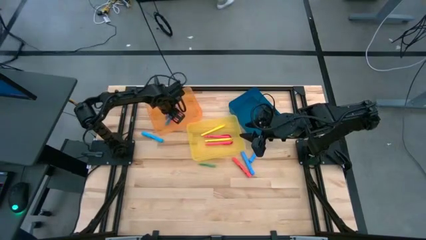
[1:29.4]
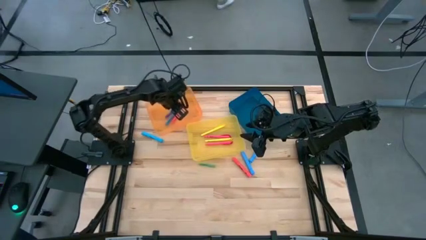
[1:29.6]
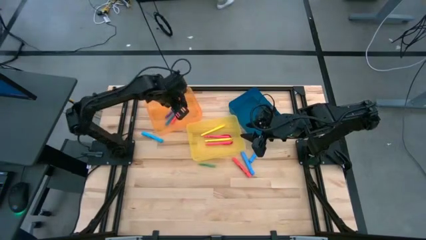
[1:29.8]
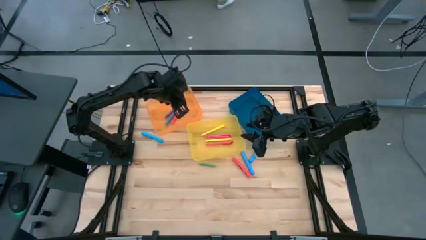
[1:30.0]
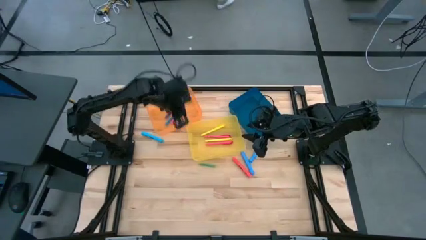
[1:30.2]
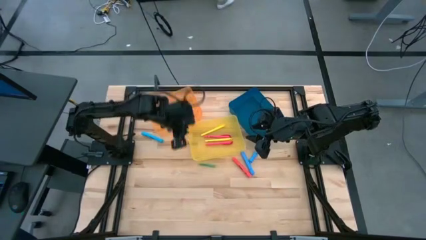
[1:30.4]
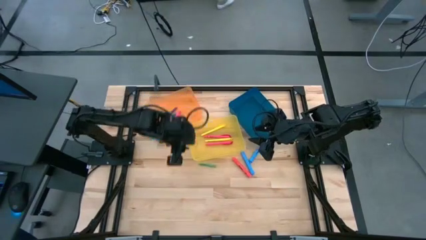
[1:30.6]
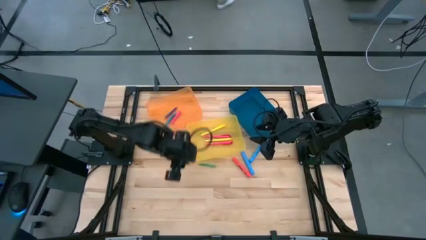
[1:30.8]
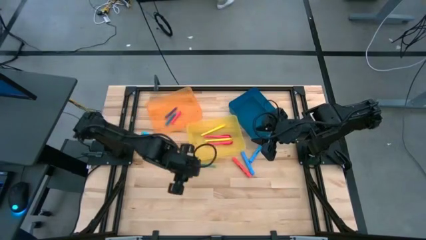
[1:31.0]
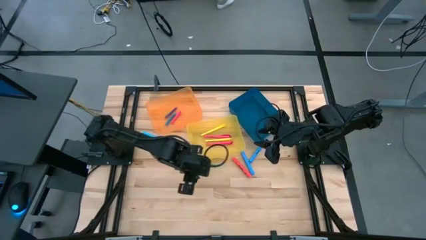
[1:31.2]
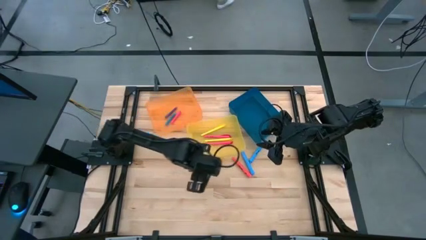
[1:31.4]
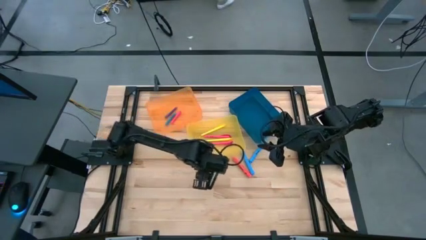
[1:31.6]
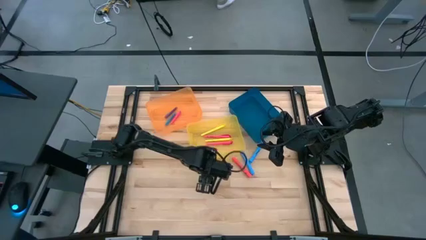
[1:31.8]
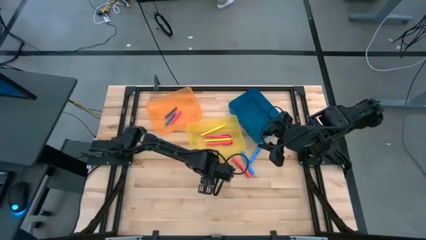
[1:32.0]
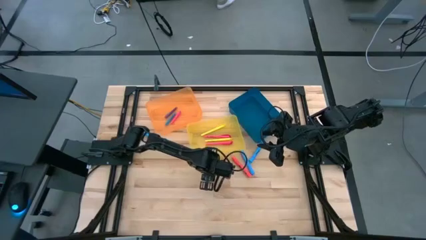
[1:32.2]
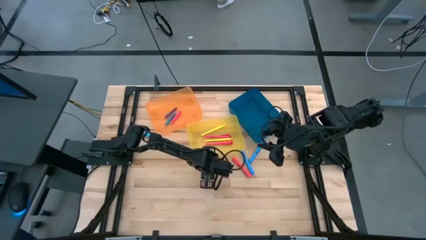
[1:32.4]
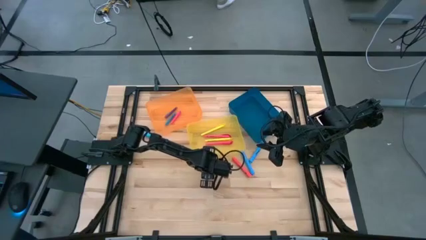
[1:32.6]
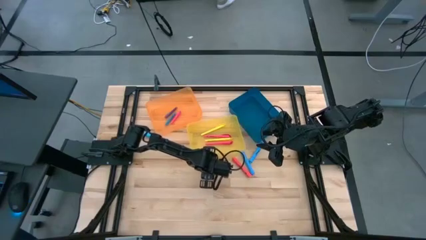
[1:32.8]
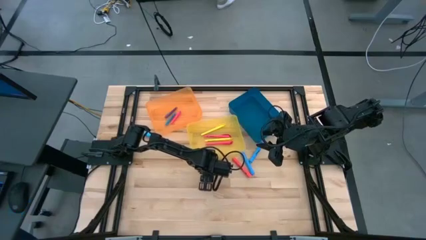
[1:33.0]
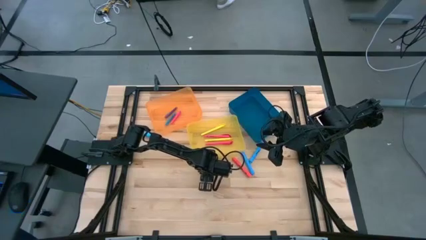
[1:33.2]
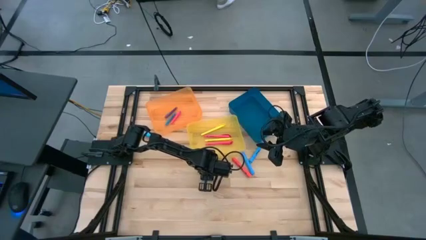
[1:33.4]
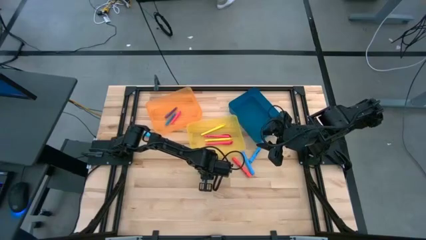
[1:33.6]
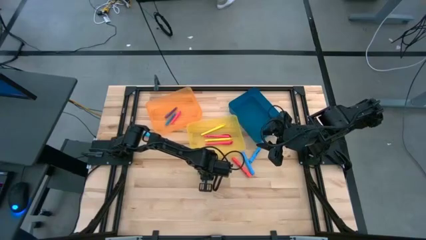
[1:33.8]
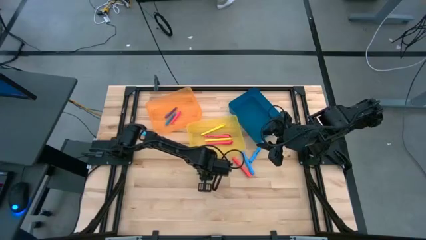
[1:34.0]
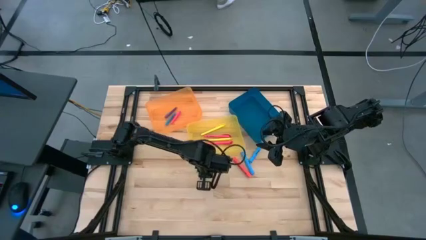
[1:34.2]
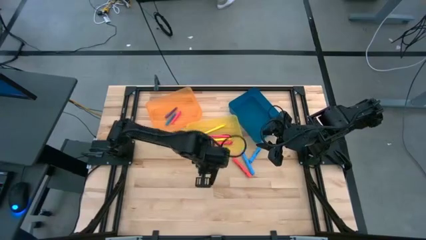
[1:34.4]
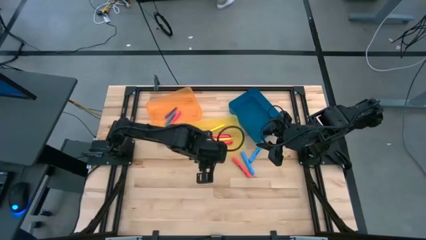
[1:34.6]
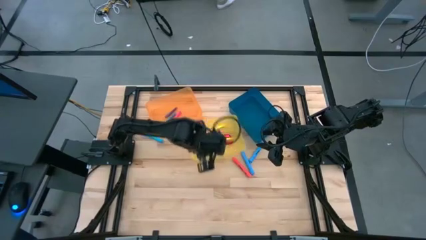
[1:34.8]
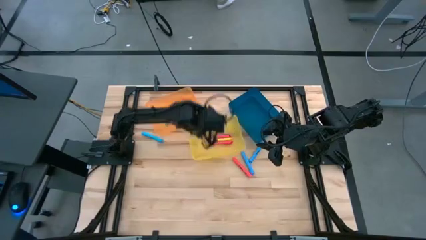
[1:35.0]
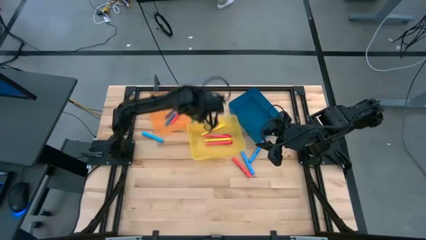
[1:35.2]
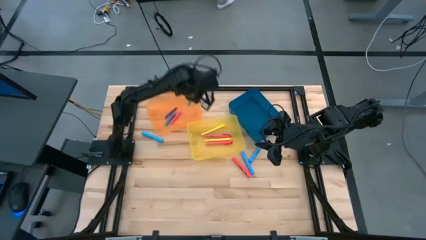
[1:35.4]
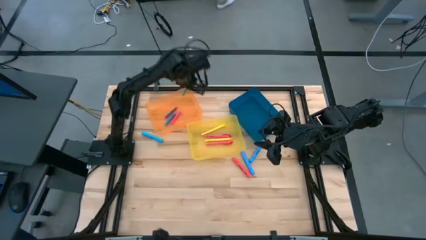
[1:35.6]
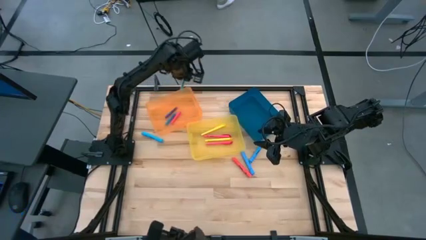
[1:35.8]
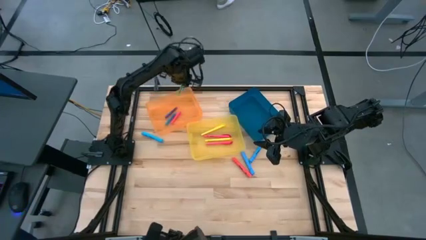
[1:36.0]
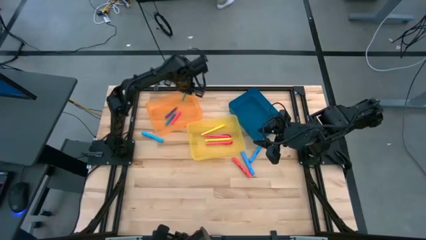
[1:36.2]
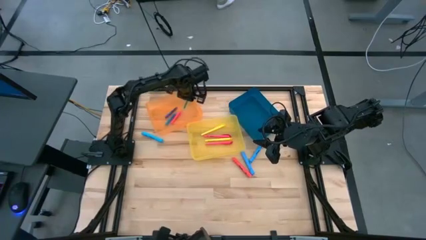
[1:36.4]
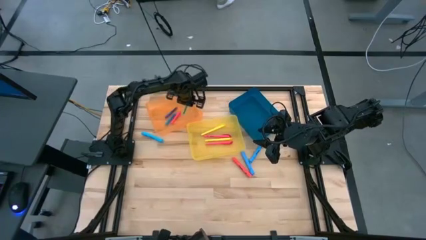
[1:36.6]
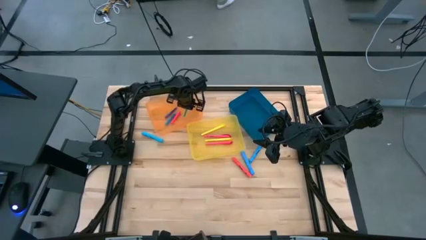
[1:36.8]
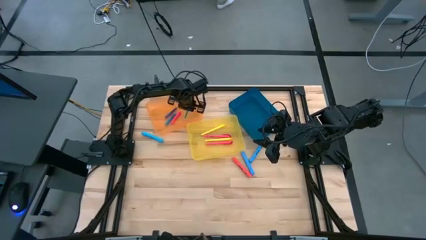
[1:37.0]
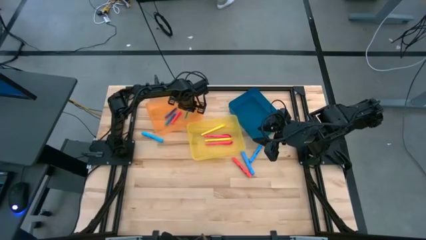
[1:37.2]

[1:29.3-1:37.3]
Task: Pick & Place Markers
Put the green pen into the orange bin

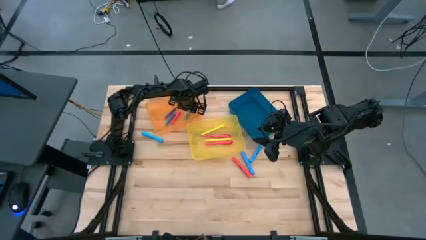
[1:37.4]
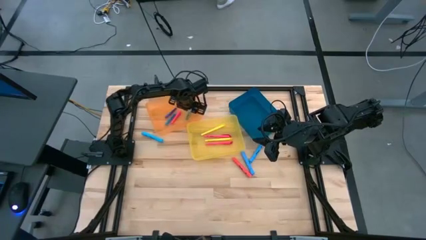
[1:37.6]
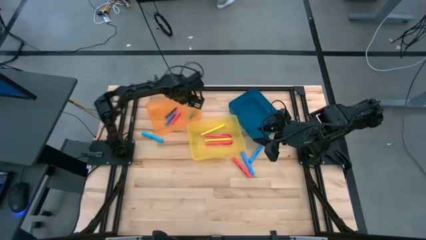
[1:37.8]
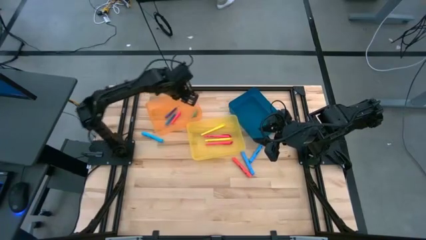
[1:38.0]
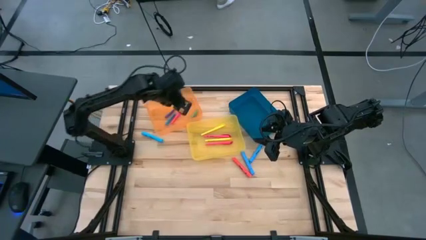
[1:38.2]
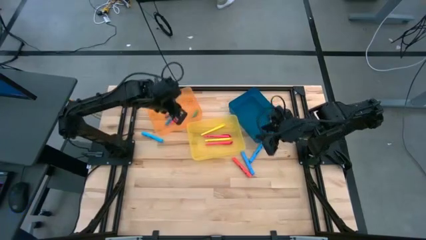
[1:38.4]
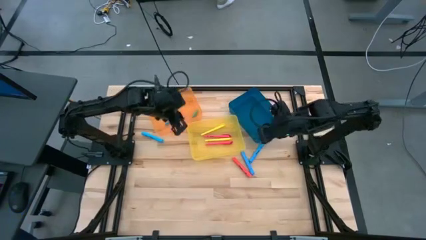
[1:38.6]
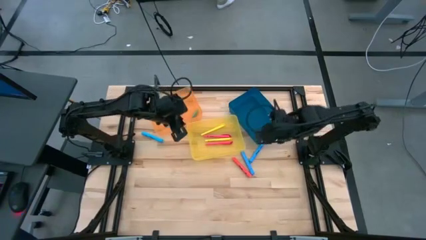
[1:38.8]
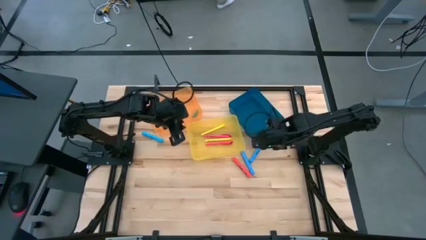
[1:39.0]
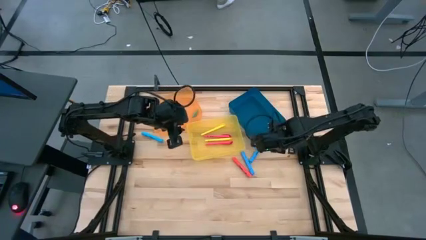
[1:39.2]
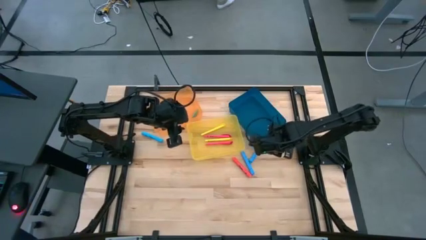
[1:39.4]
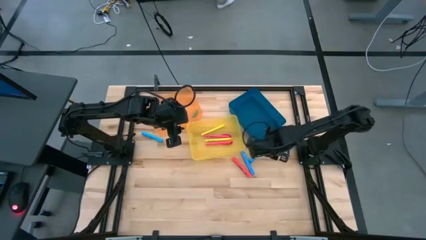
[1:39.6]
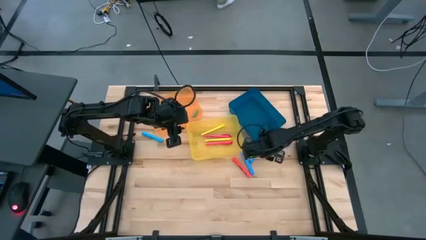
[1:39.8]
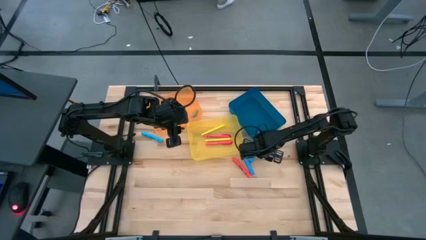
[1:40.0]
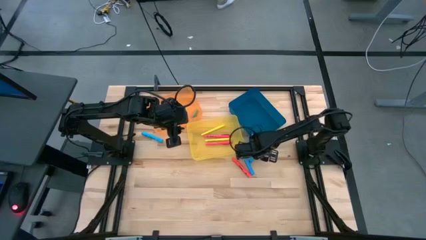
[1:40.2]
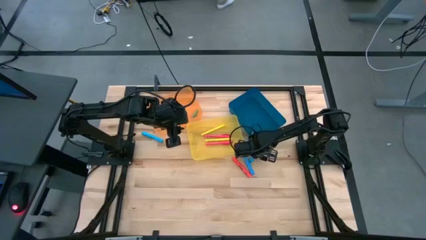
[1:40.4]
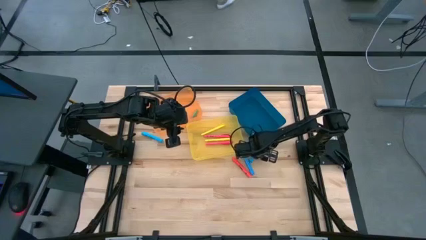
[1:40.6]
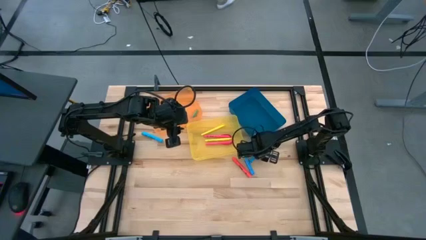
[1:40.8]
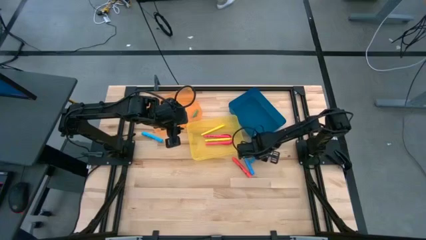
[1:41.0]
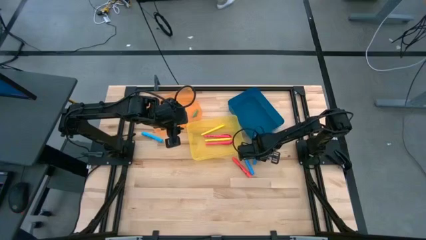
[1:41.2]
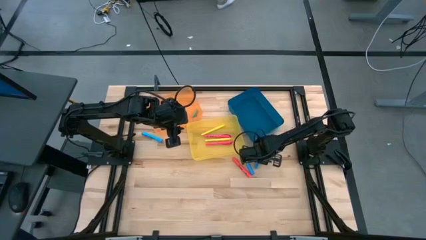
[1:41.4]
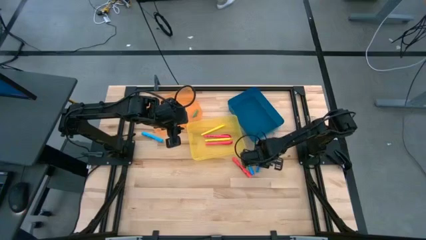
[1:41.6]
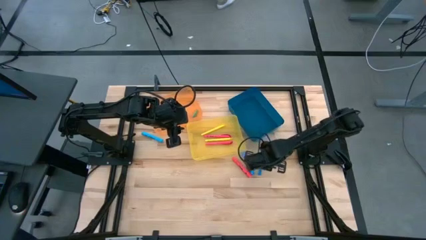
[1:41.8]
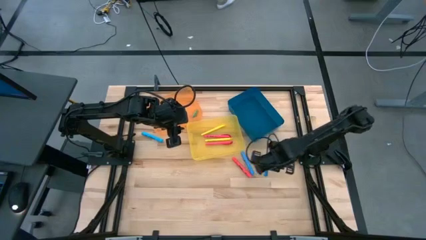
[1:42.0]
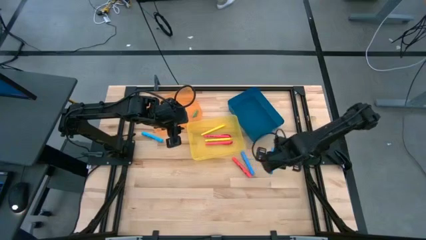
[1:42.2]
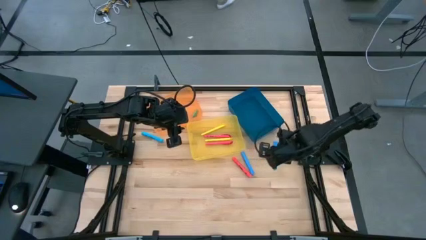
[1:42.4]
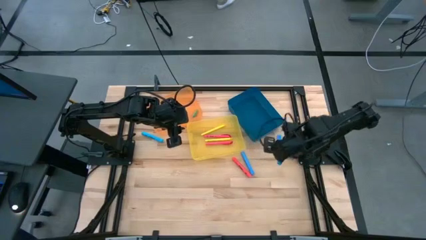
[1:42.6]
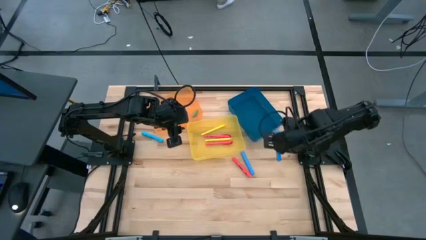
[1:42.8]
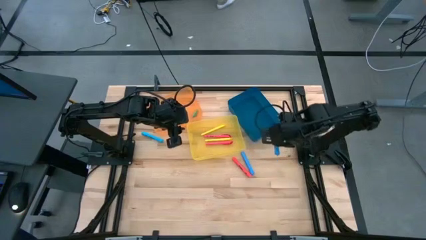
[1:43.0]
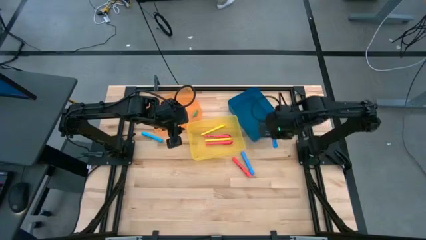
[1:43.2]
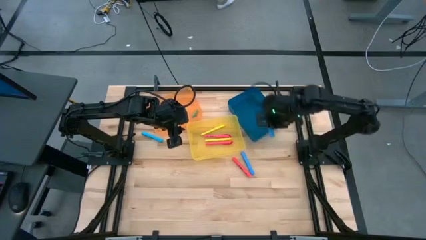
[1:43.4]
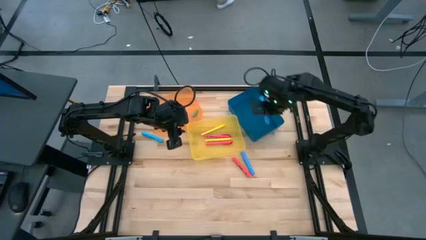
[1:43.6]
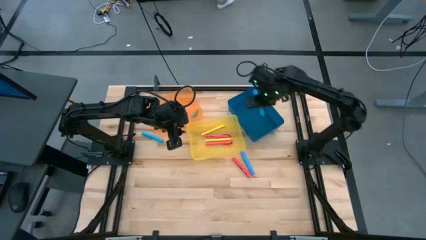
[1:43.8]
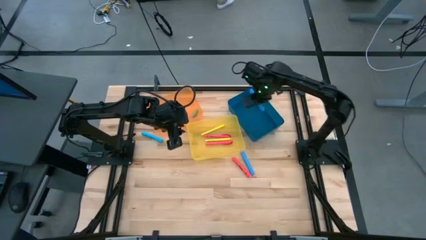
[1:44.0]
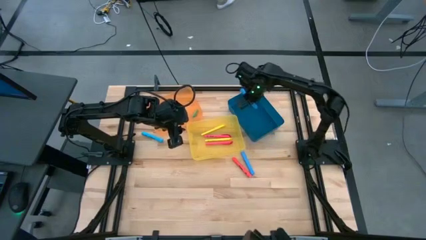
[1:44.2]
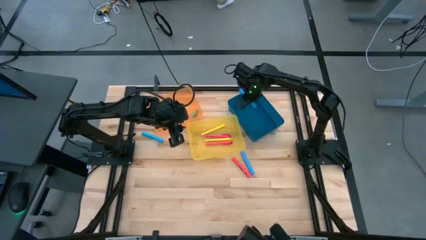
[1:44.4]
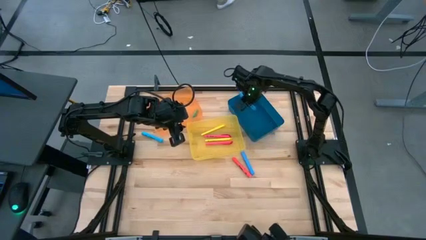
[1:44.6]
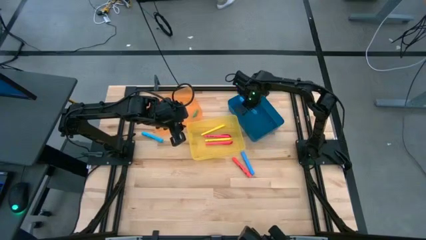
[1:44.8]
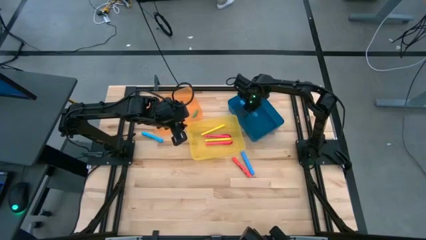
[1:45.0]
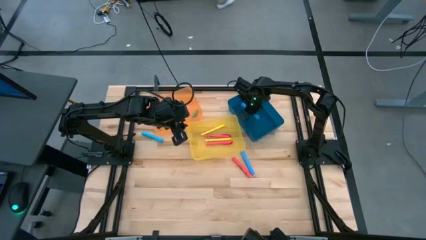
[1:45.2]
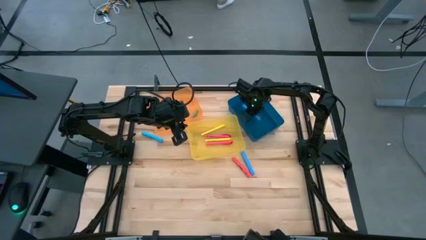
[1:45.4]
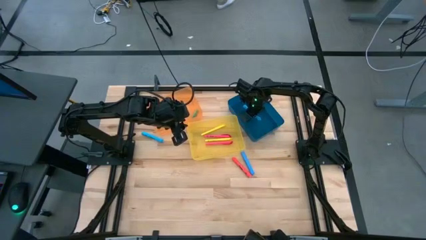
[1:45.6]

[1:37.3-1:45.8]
Put the bottom right blue large highlighter into the blue bin
